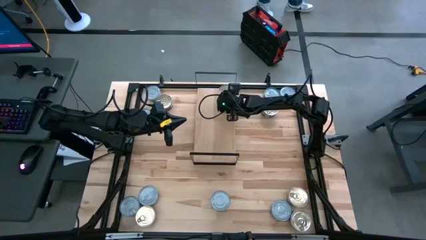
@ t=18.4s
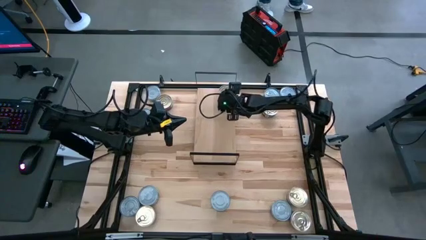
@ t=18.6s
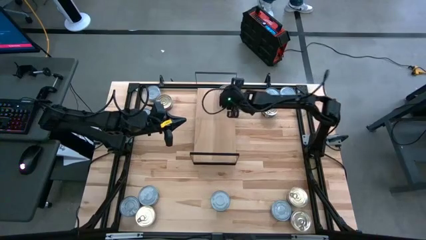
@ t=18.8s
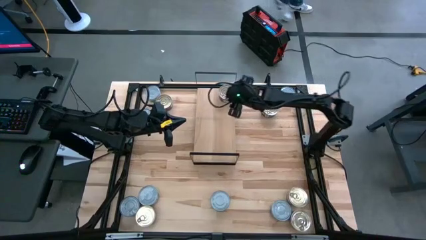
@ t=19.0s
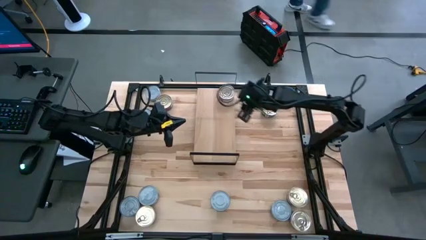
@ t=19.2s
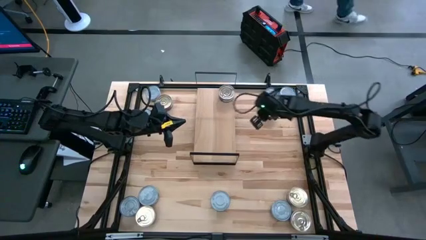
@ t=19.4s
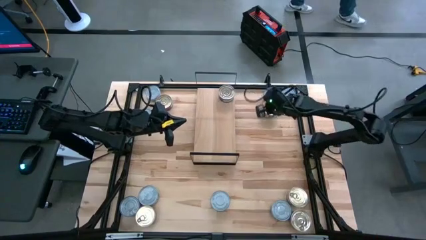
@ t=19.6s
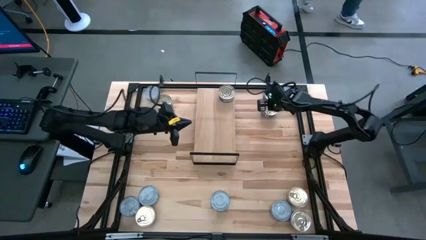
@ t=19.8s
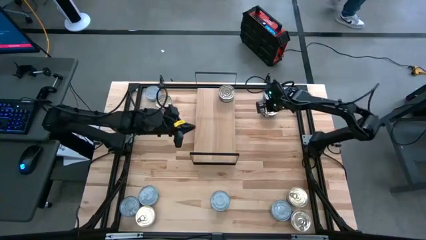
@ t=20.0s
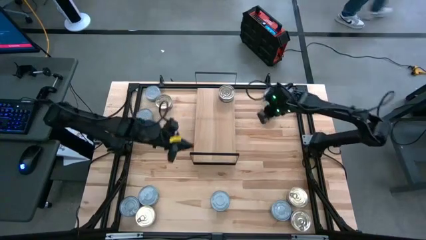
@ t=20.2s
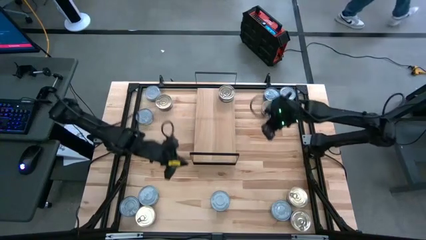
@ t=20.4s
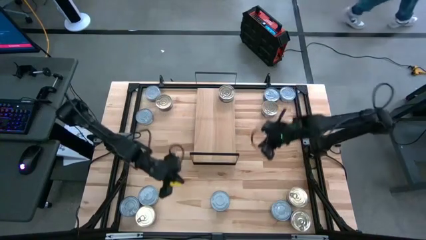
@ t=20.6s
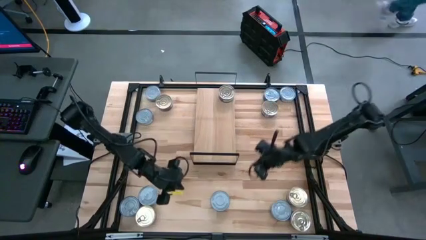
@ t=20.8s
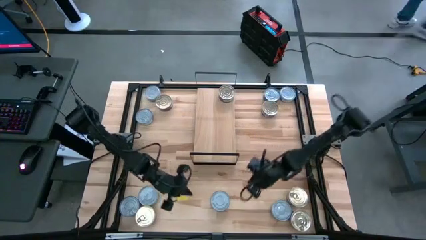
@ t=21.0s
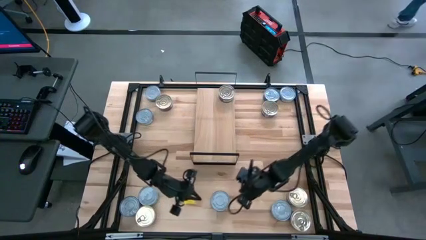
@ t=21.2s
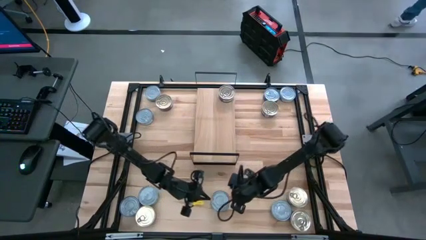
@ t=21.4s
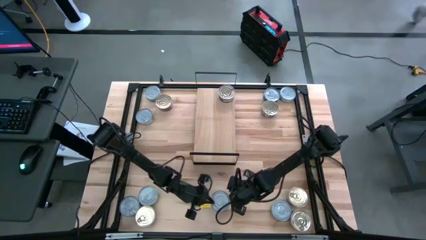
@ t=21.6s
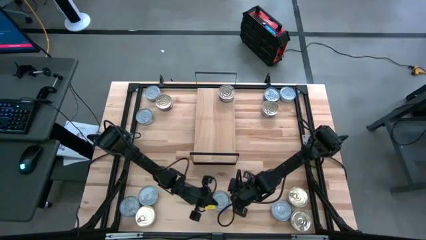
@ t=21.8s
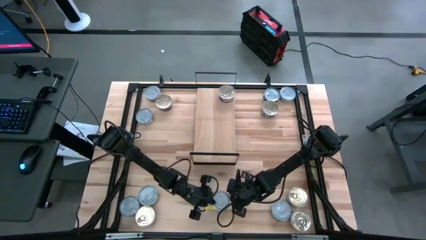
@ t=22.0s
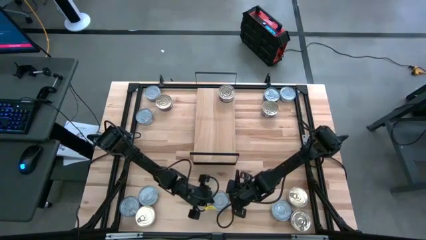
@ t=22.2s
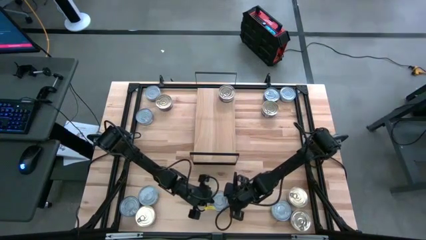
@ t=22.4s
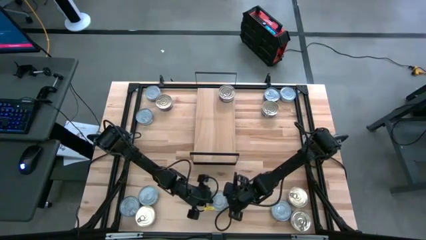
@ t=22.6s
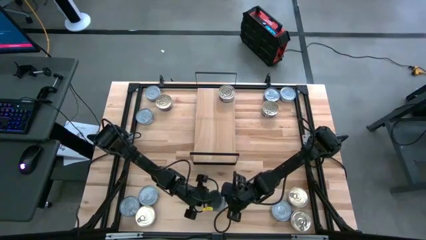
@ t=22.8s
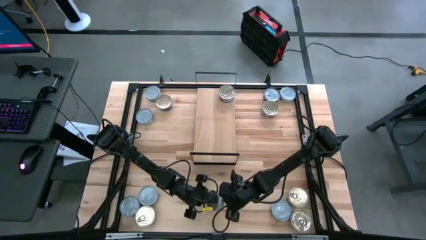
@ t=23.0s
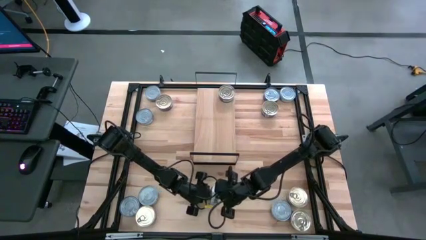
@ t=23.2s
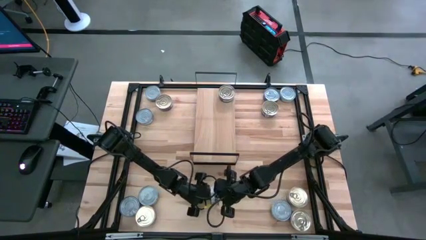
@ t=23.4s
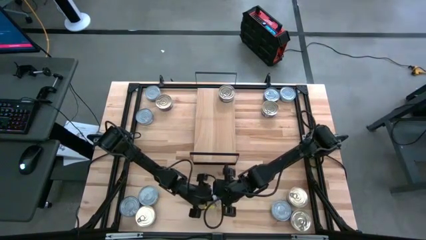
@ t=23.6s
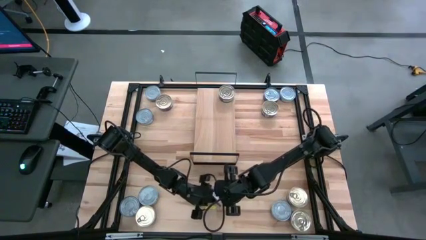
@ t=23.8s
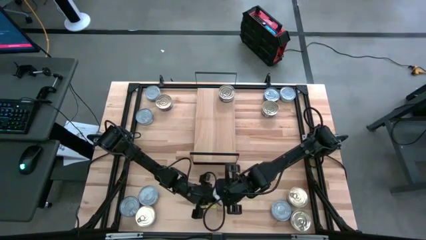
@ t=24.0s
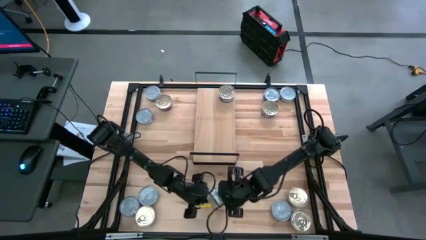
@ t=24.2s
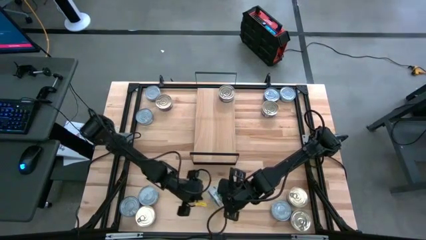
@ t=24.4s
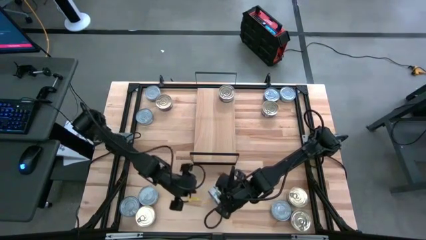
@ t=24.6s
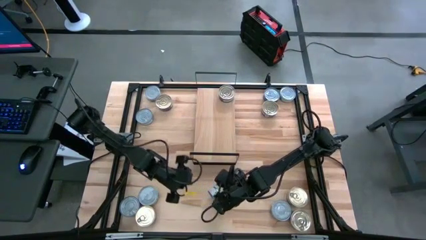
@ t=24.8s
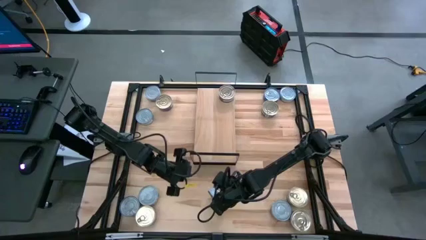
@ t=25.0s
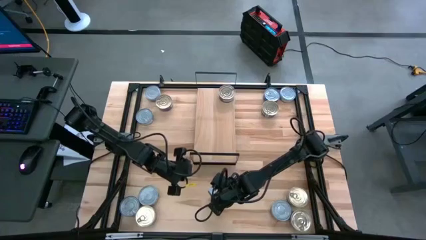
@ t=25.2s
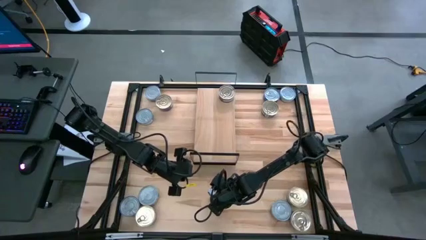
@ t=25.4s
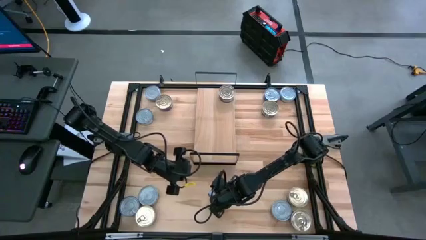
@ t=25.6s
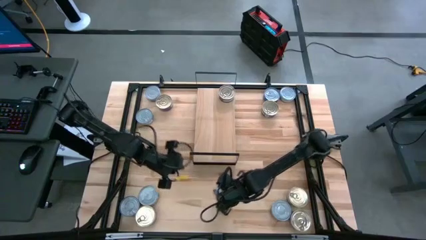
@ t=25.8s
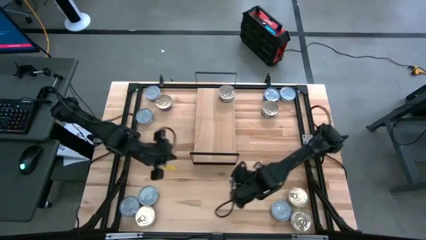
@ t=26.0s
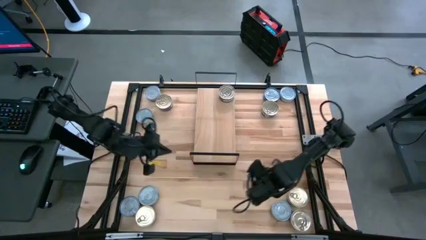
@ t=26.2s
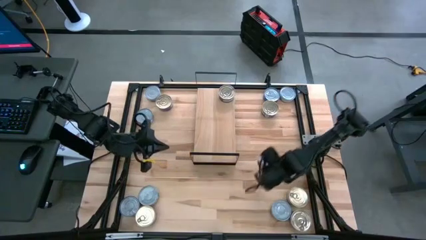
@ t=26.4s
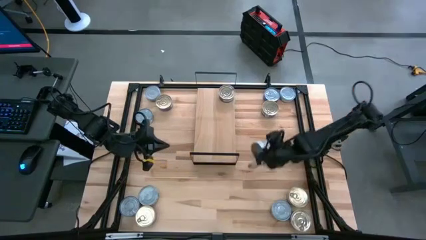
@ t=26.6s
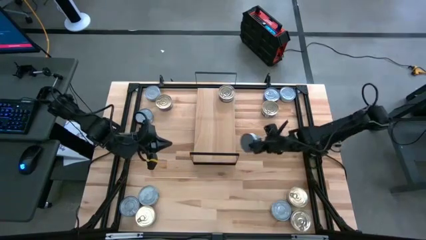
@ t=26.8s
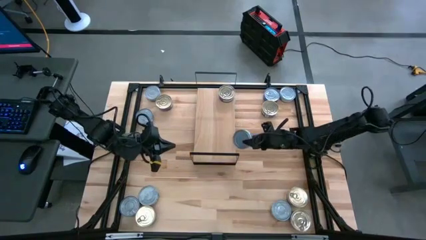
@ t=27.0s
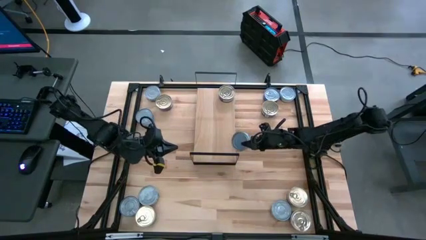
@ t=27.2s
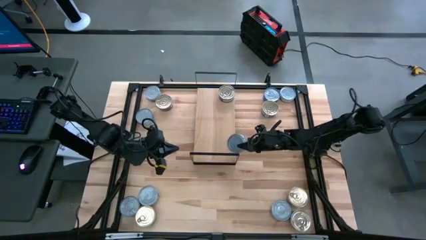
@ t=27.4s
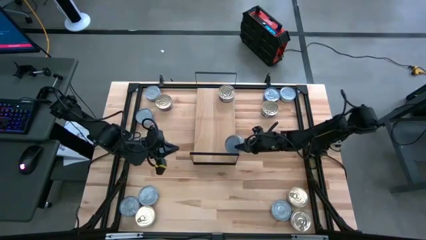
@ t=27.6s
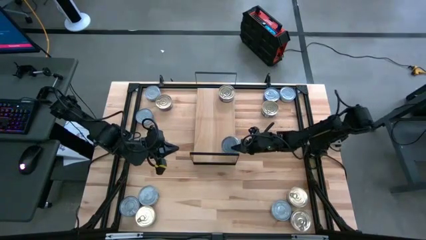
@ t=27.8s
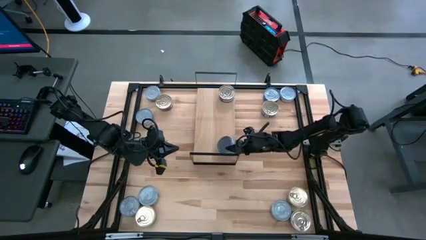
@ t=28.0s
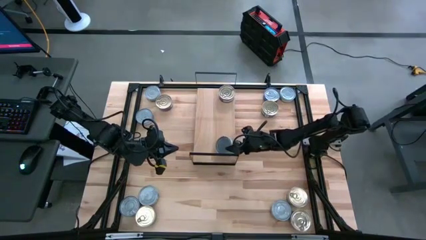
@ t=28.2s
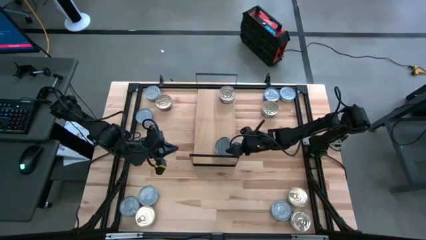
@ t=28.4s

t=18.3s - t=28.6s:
Task: Stack canned seafood by type on shelf
Put the green tuna can on the shelf
